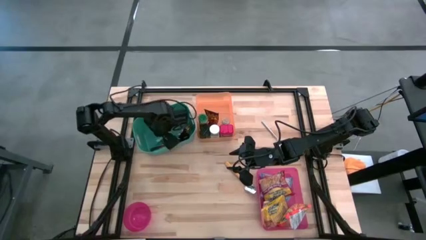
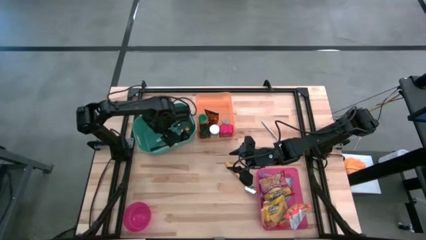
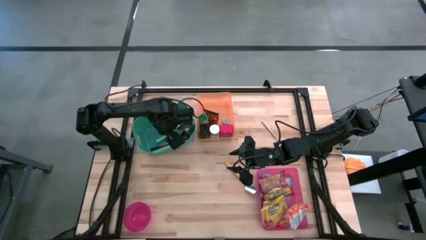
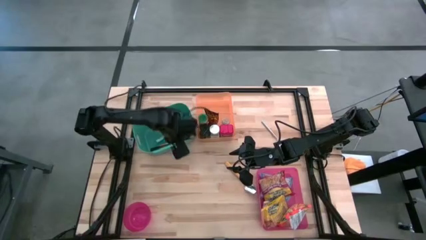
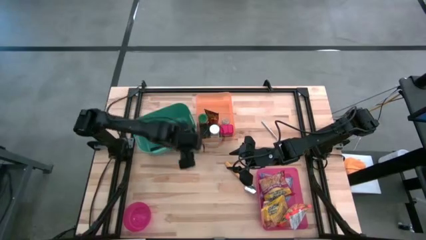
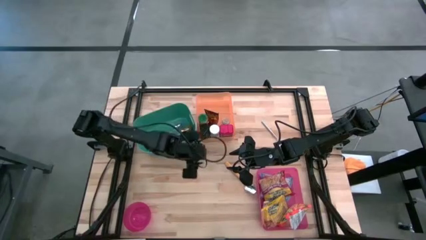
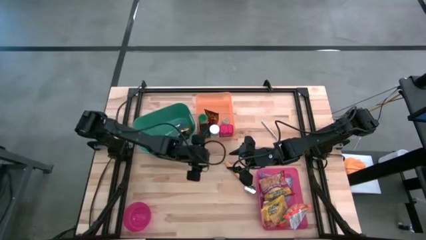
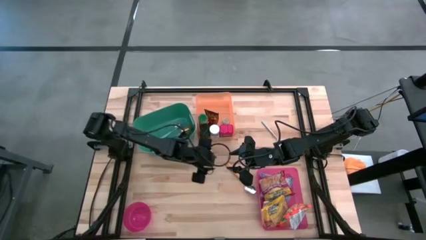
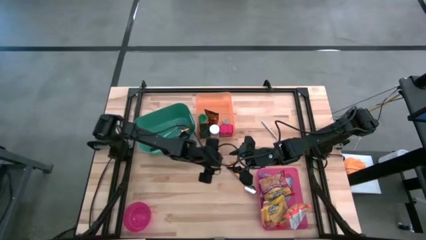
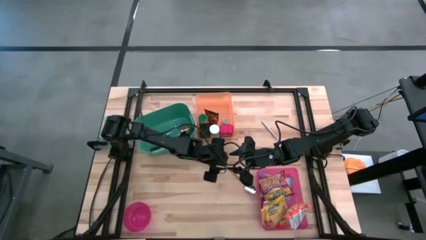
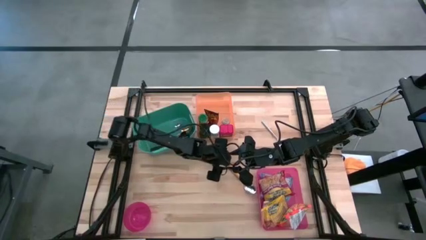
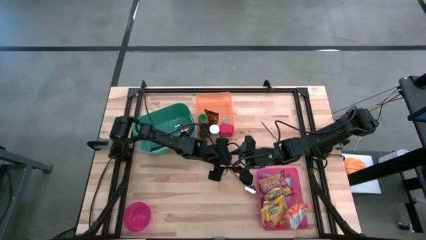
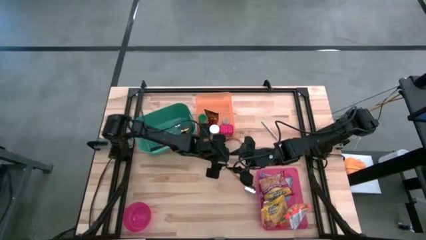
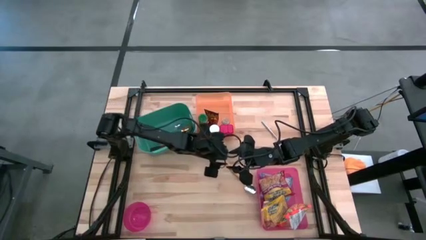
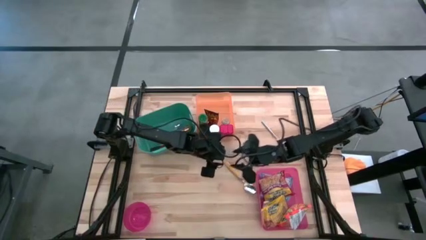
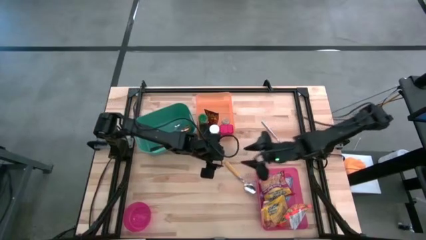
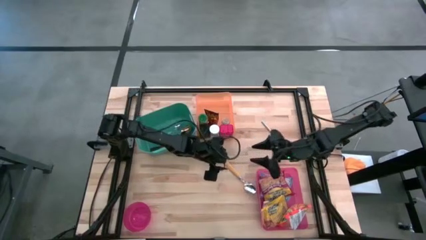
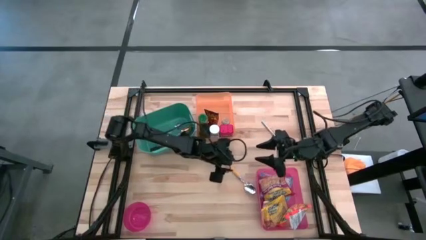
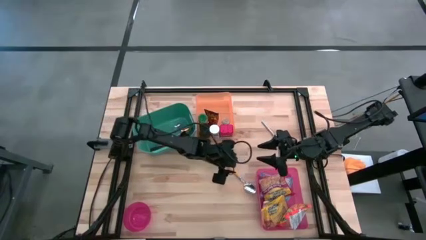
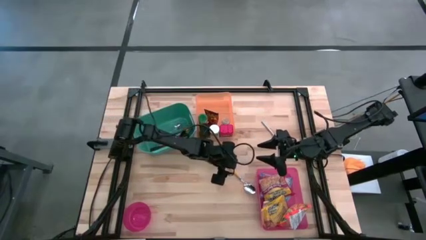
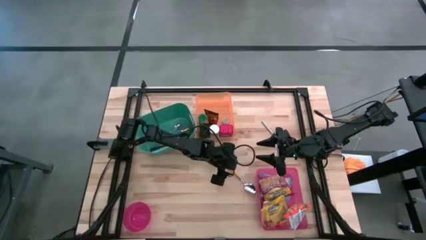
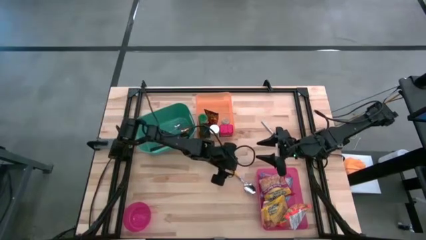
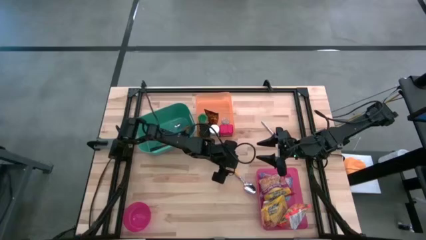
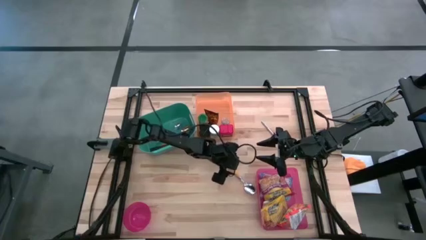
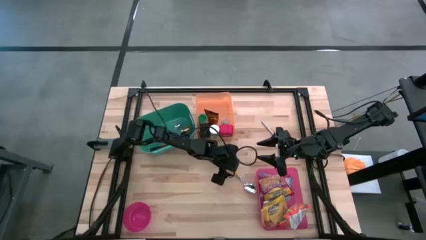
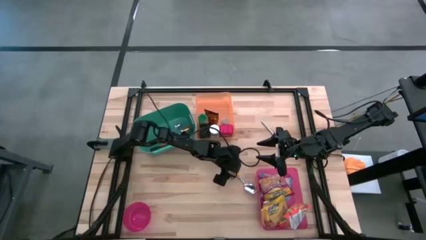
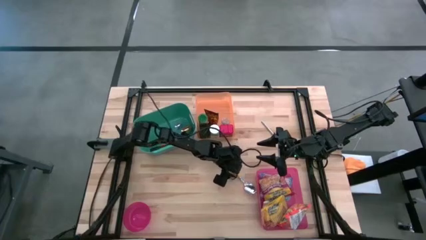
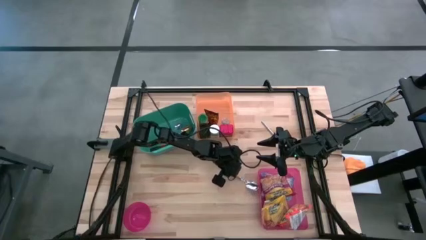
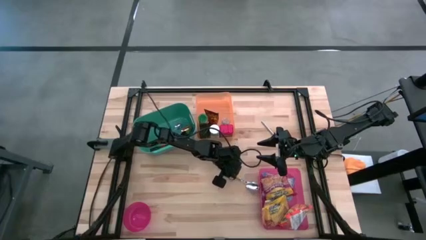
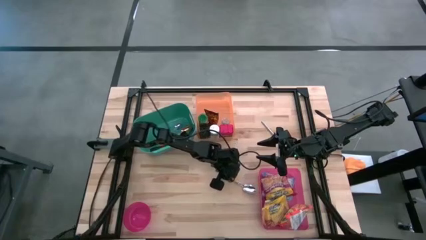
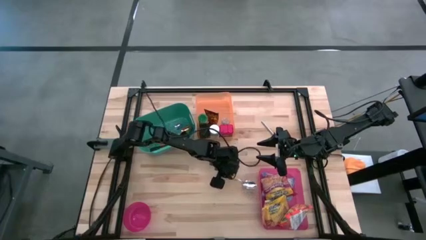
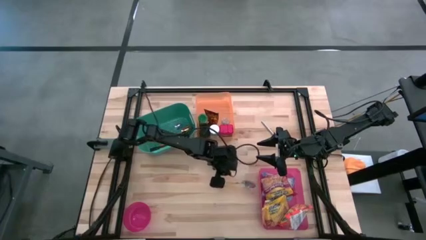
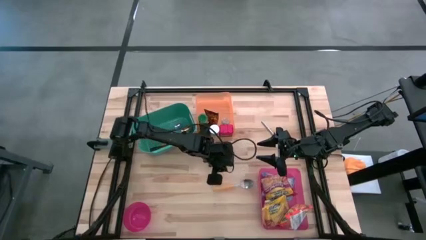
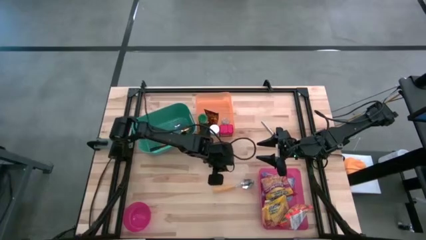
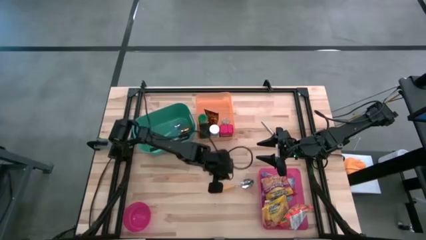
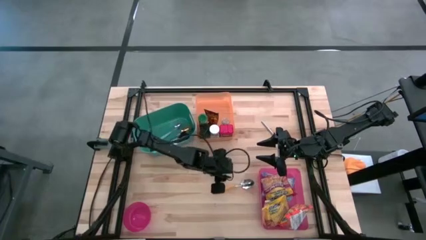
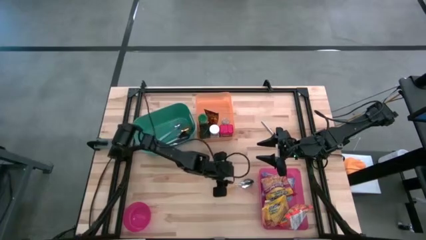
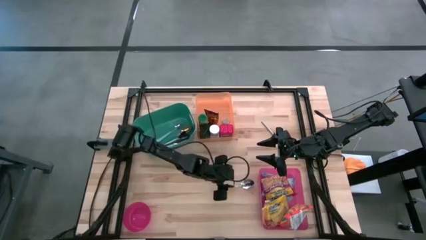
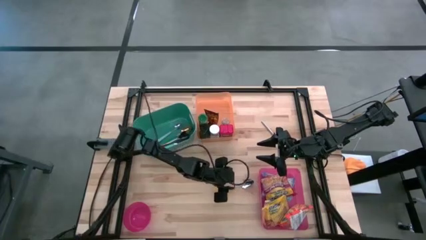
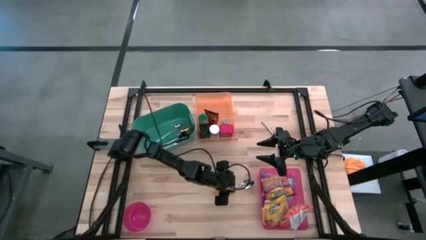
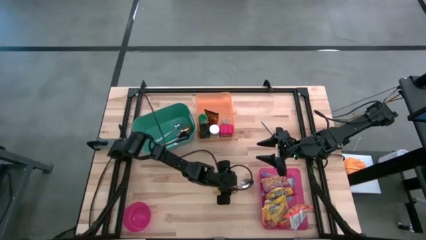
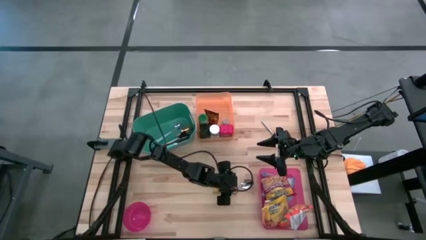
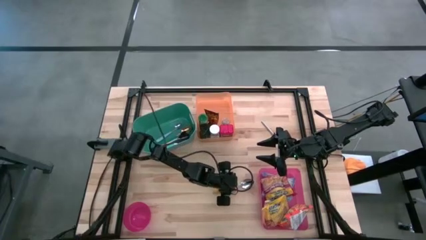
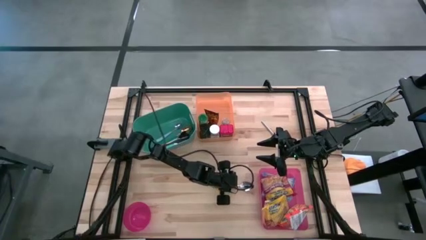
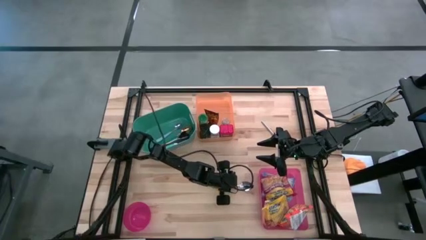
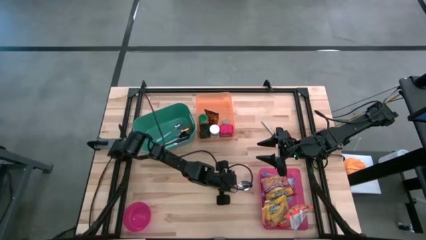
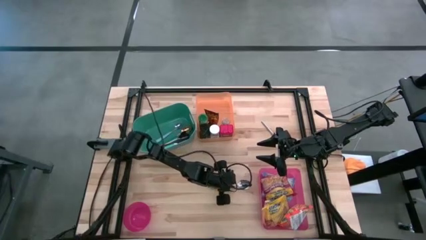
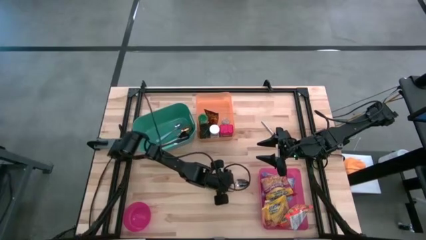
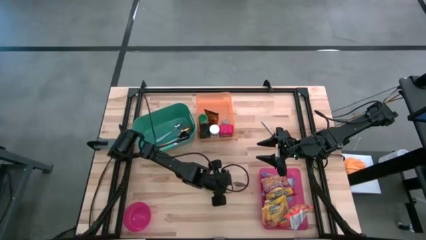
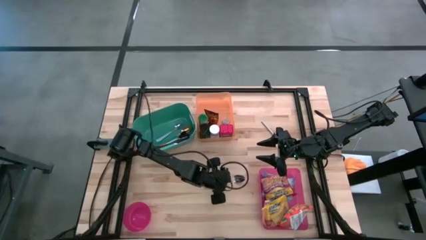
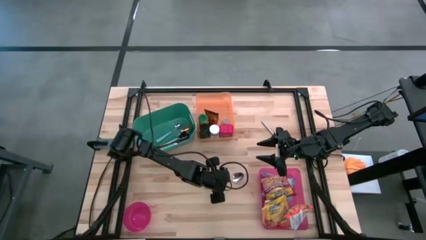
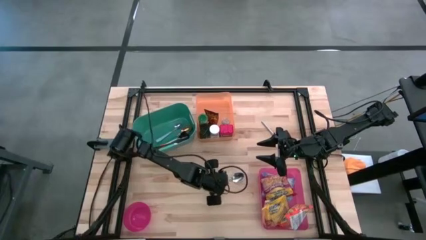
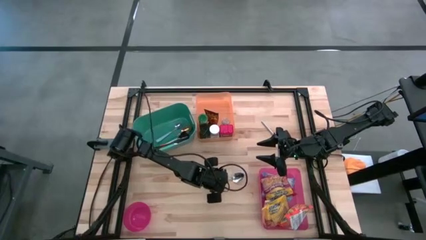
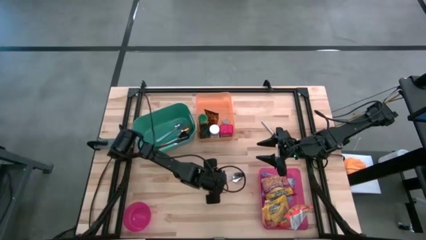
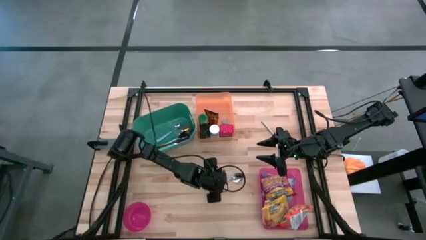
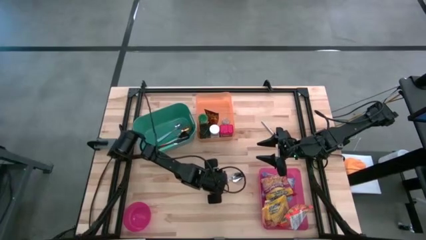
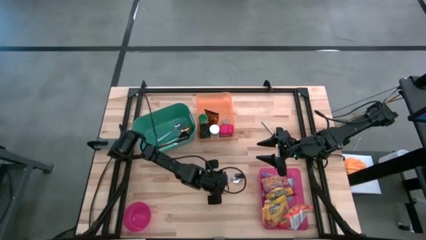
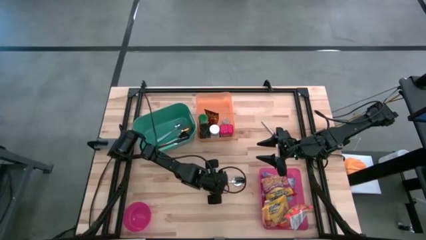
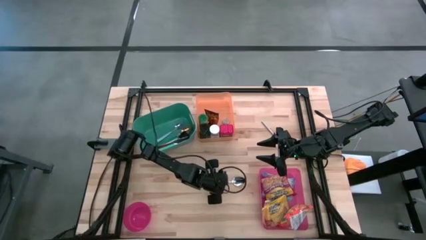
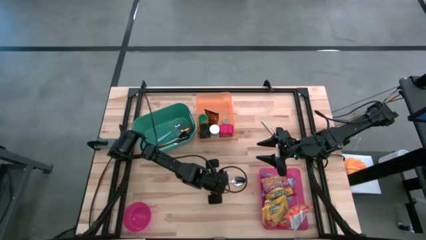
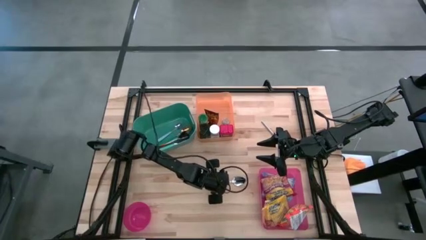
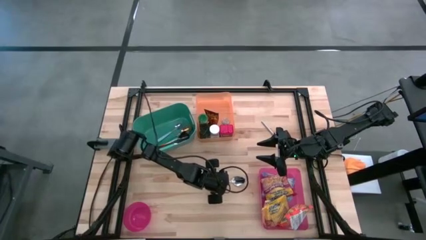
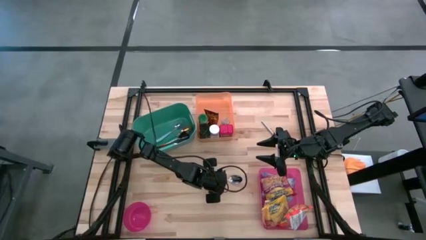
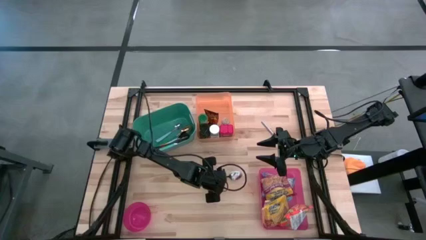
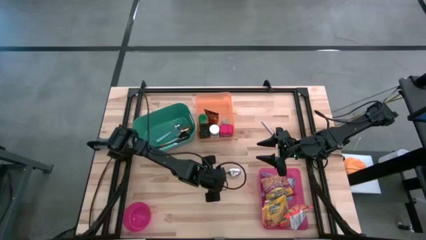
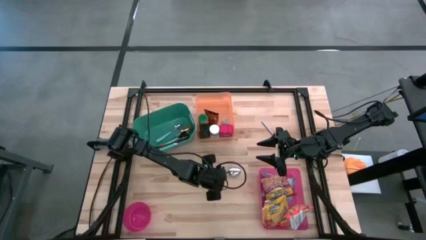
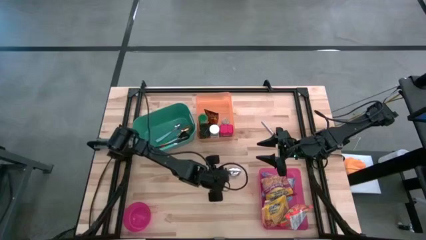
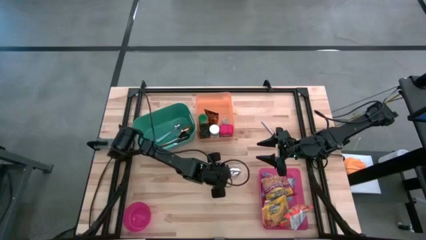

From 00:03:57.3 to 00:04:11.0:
Put the yellow spoon into the green bin

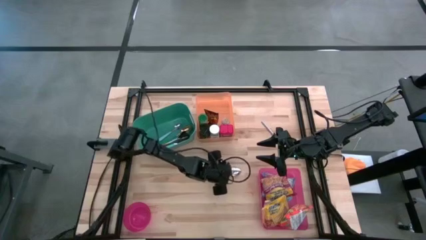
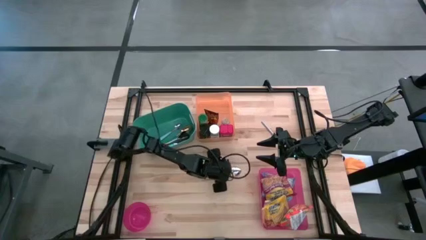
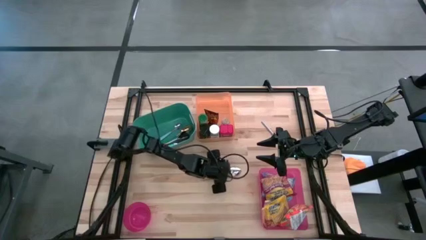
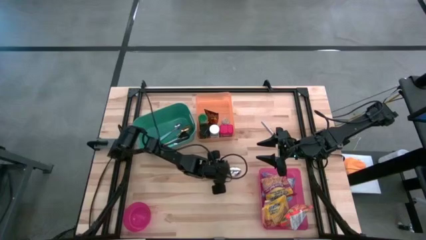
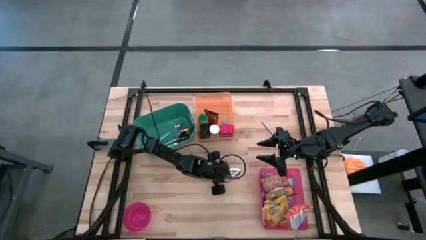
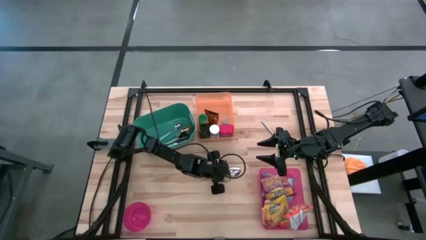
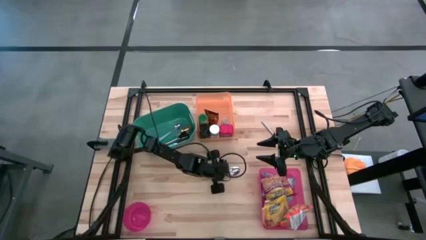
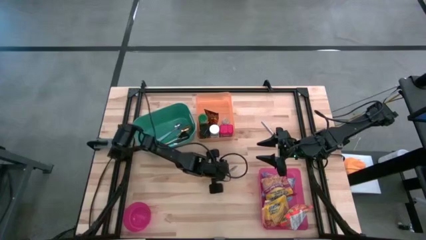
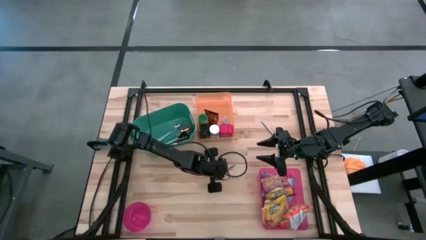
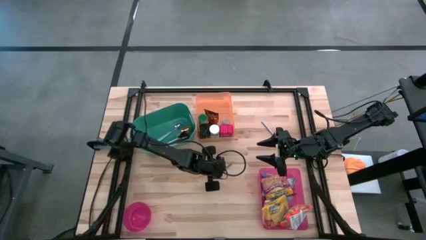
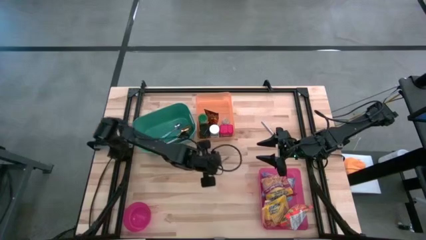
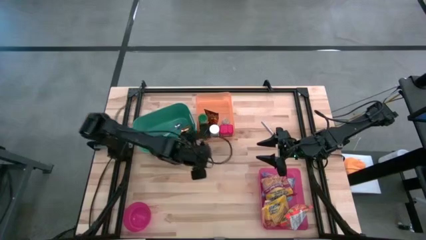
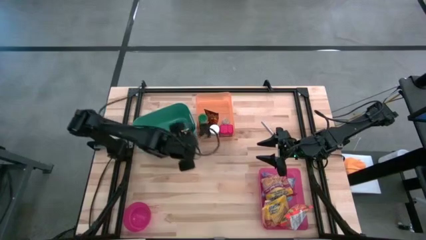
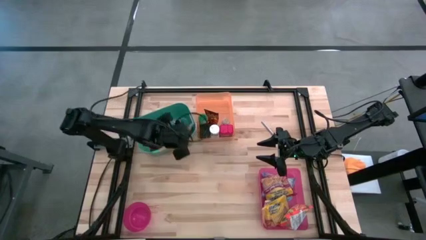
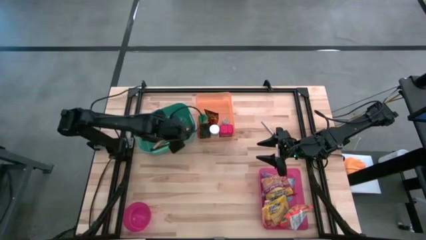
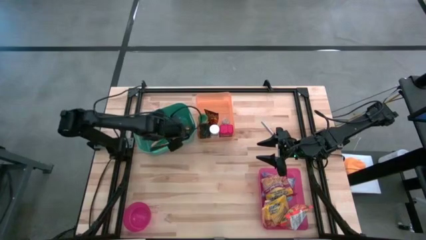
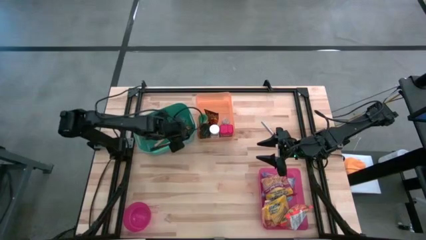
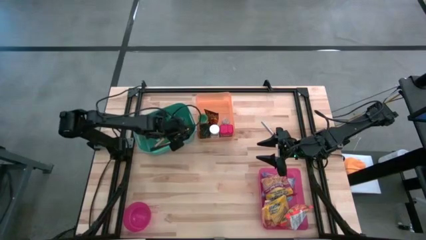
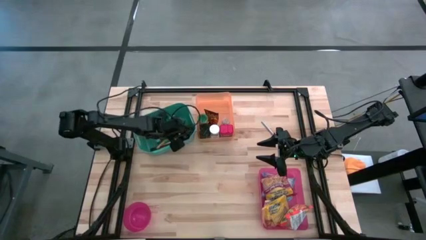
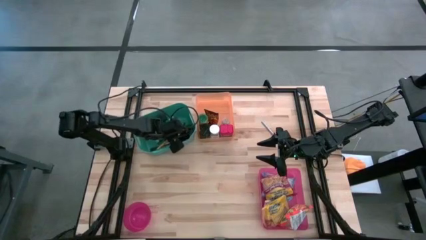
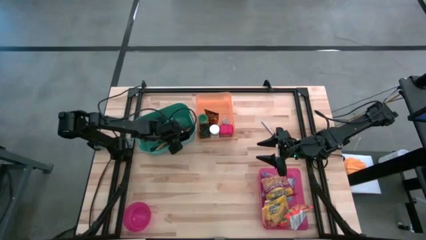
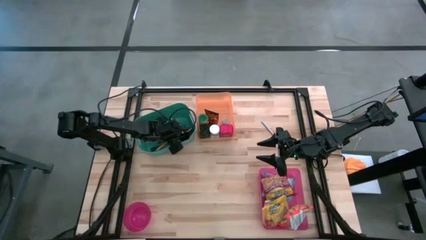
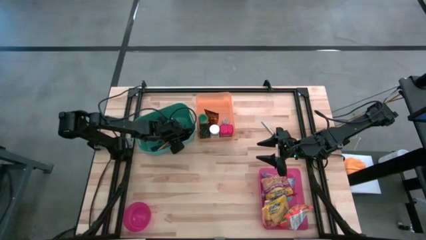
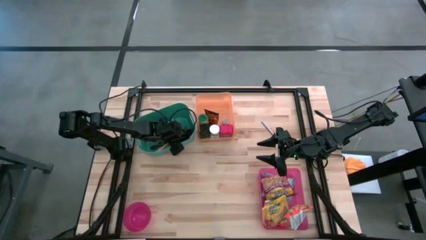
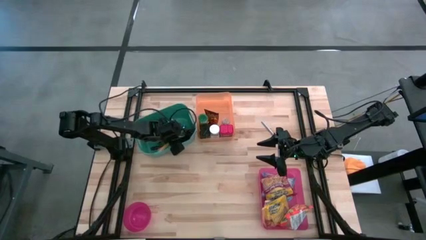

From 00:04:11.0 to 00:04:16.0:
Put the yellow spoon into the green bin
